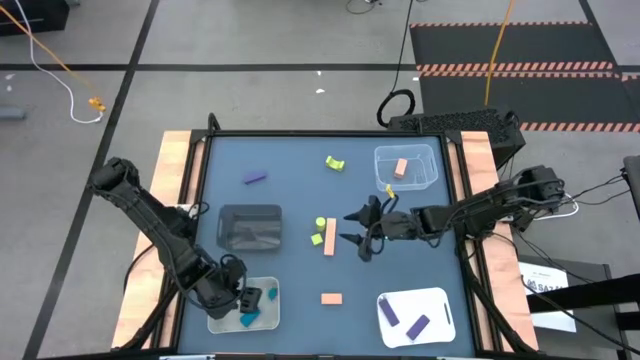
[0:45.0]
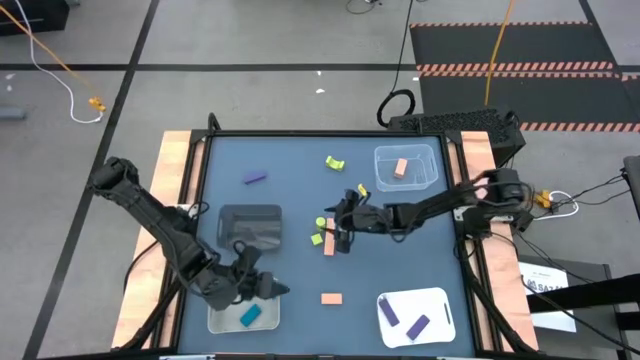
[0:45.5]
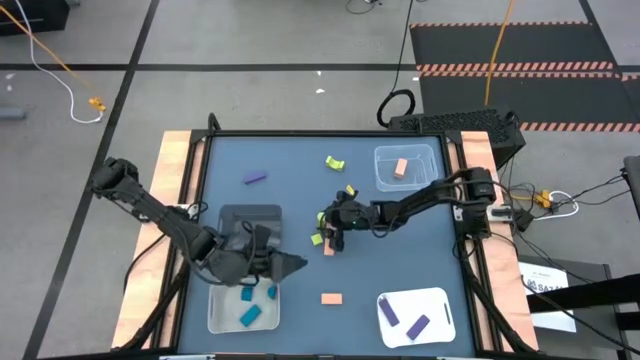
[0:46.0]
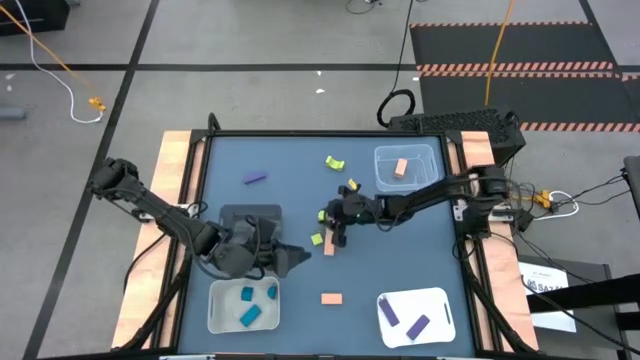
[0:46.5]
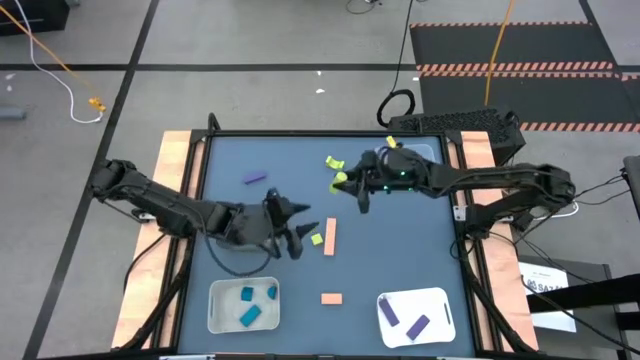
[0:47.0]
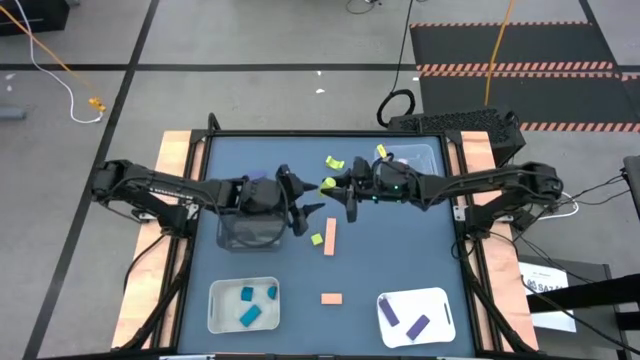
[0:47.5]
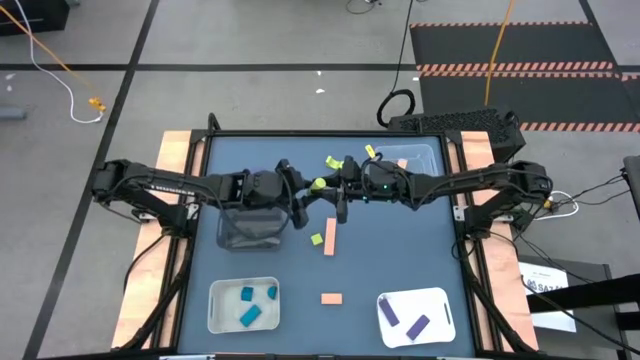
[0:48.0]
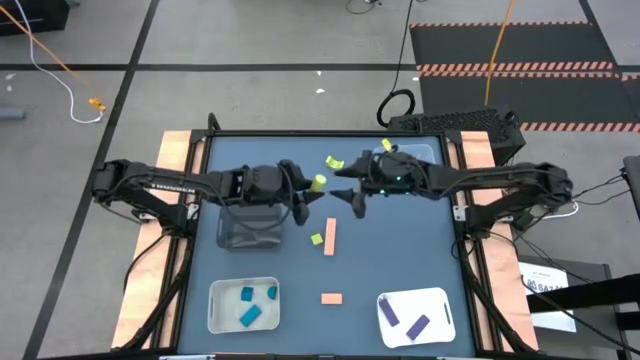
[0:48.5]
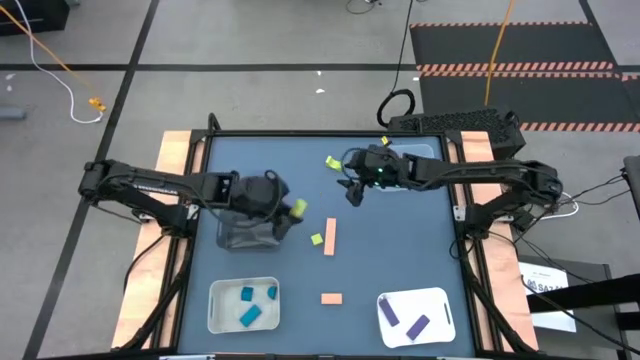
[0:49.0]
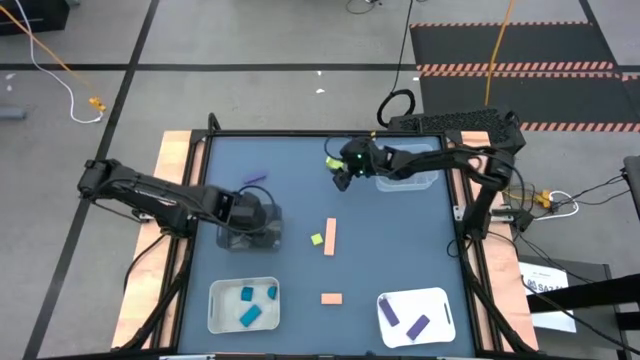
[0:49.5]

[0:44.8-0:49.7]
Task: Sort & place blocks by color
Put the center green block into the black bin

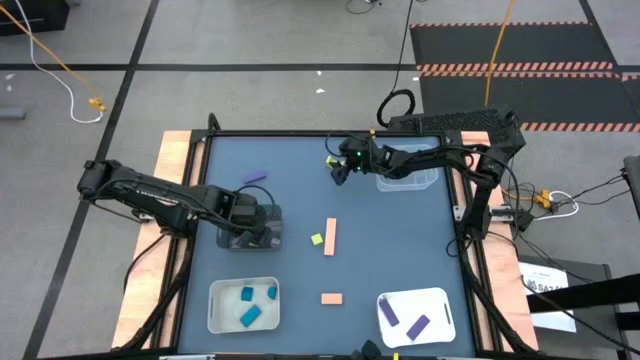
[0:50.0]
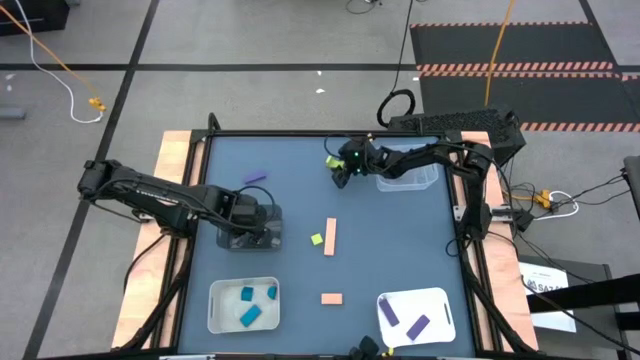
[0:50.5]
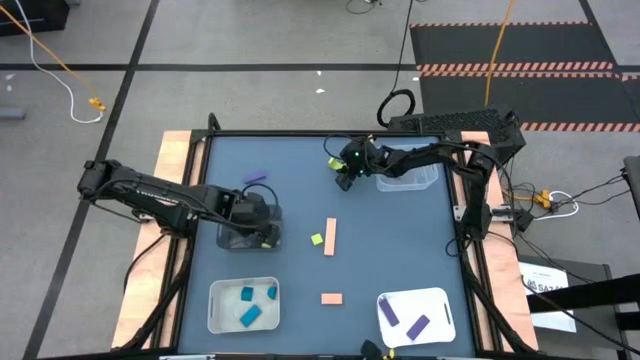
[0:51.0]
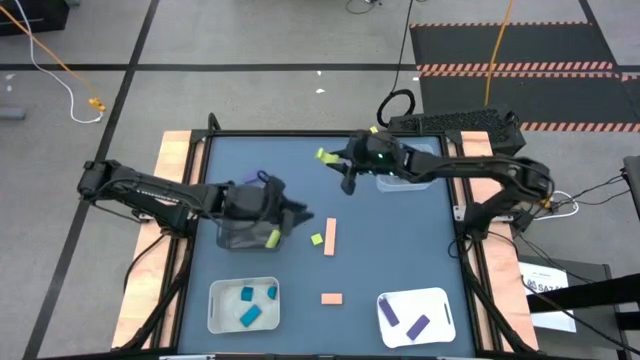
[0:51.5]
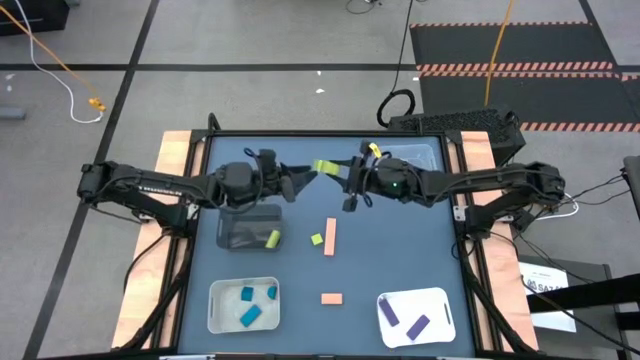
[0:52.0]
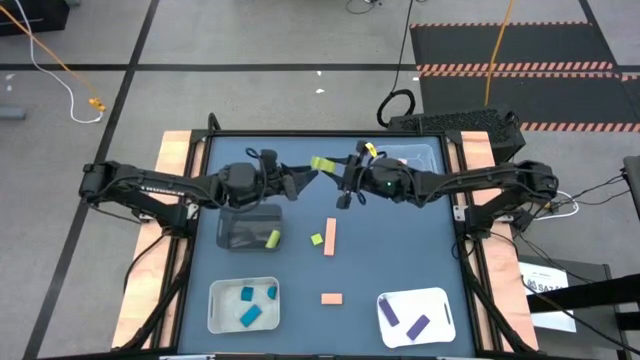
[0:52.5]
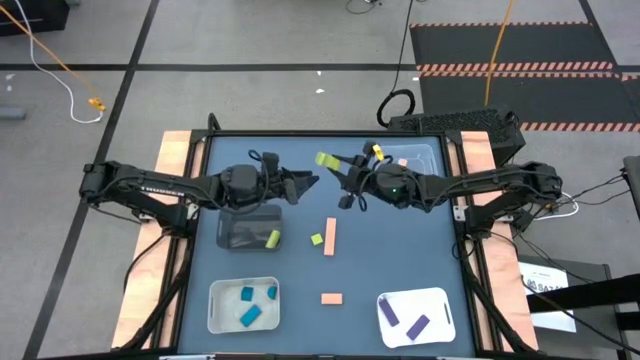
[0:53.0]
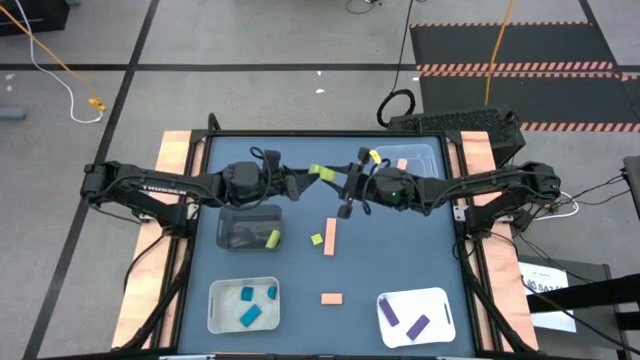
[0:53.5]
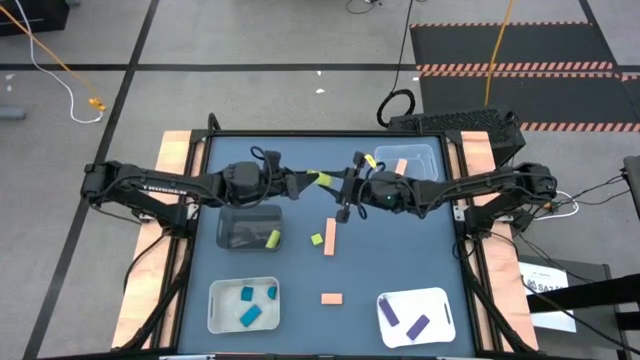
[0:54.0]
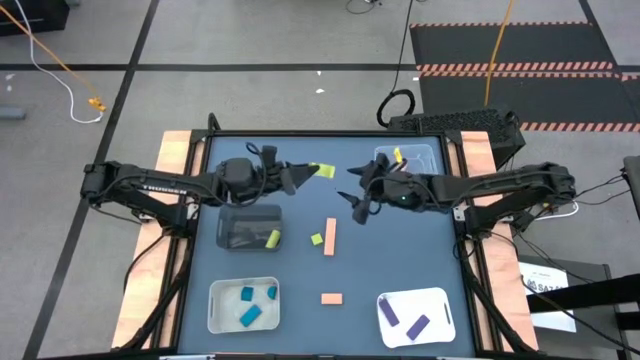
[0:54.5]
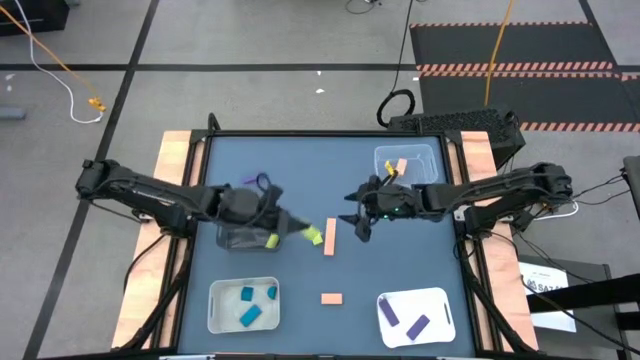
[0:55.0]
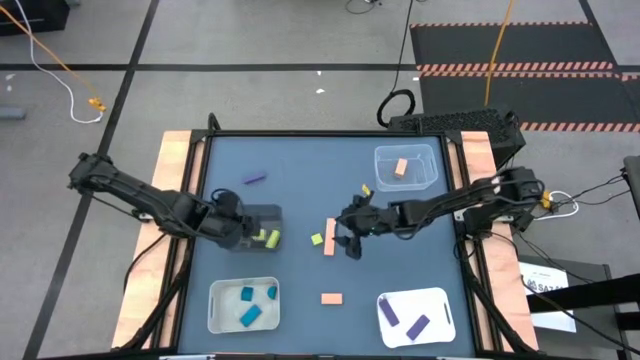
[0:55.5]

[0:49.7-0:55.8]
Put the top green block into the black bin

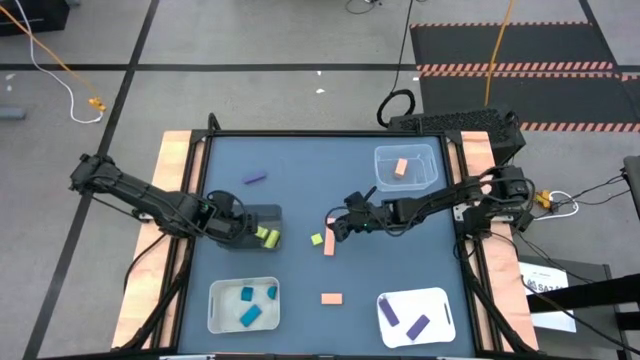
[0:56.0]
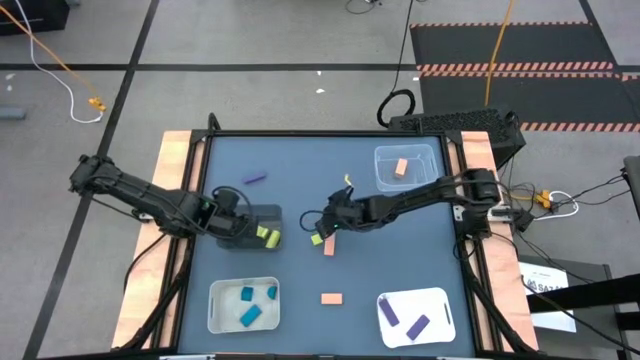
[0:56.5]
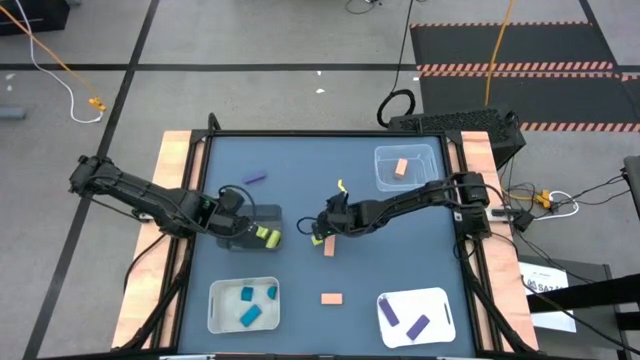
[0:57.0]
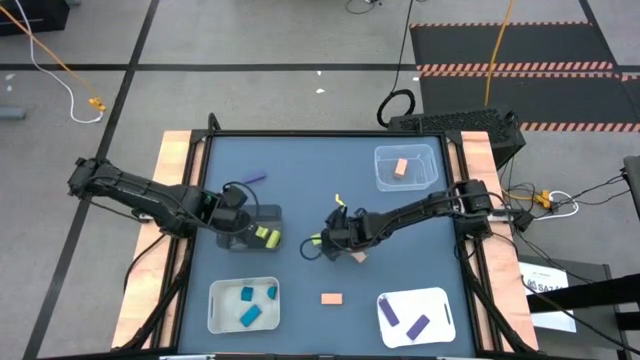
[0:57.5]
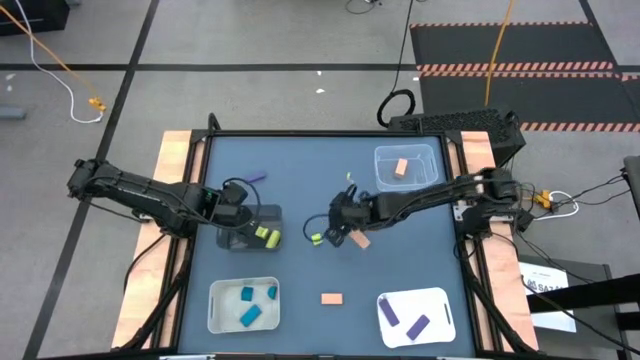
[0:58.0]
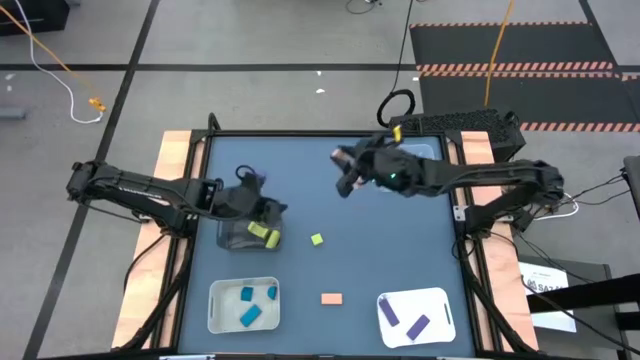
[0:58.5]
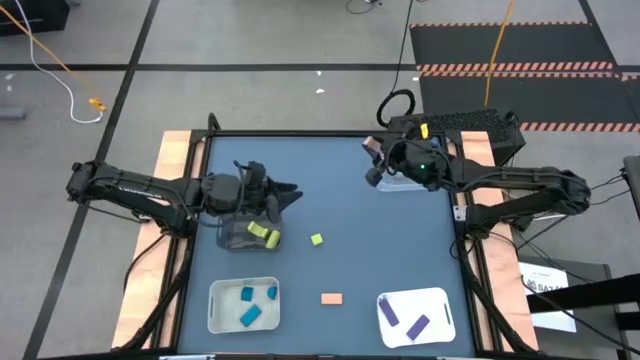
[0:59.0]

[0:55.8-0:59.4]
Put the top light brown block into the transparent bin

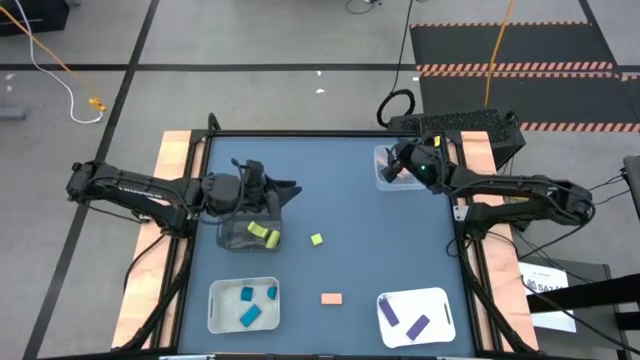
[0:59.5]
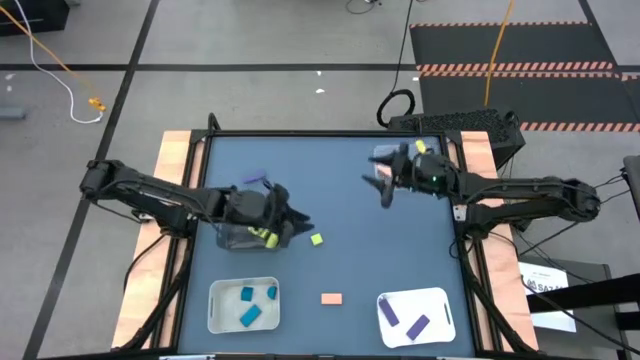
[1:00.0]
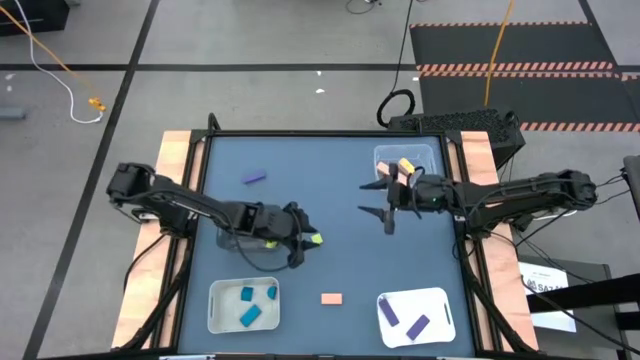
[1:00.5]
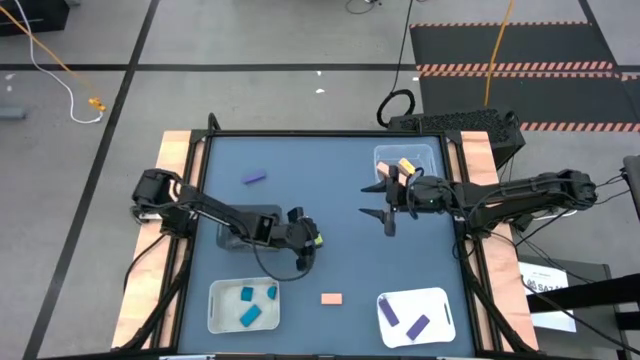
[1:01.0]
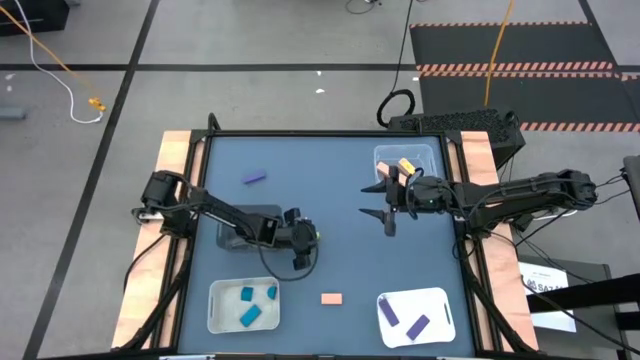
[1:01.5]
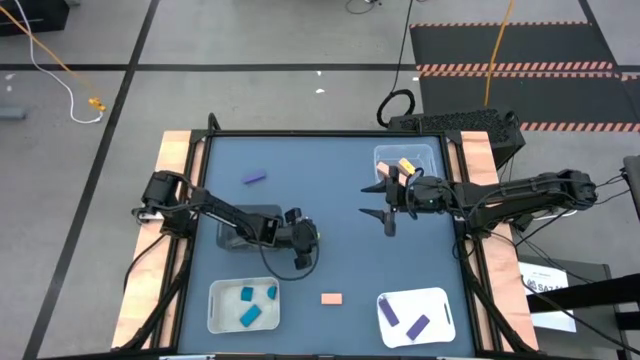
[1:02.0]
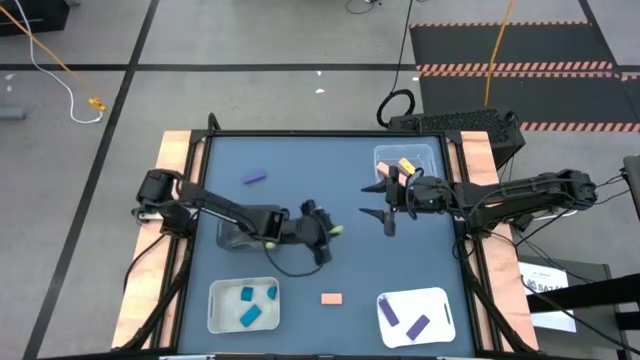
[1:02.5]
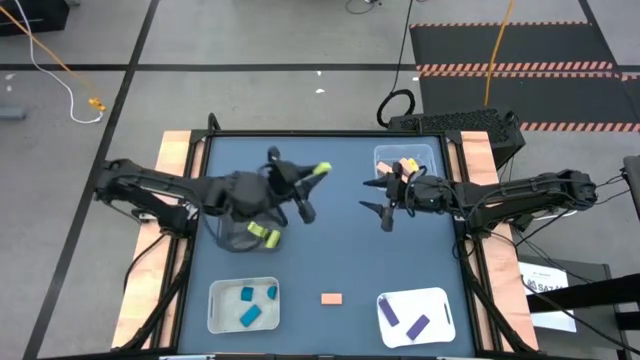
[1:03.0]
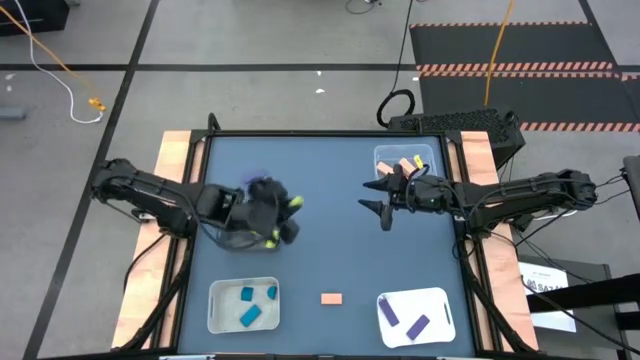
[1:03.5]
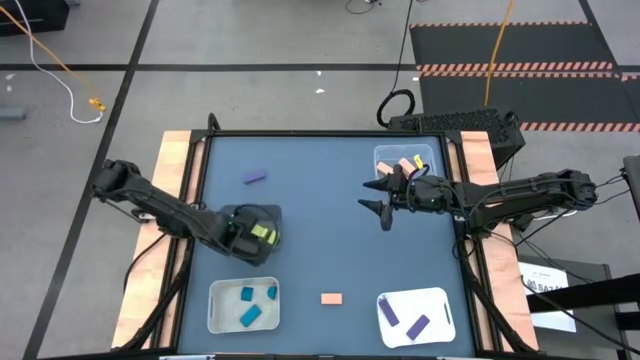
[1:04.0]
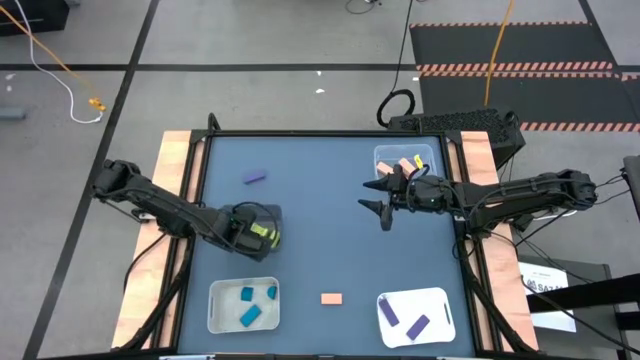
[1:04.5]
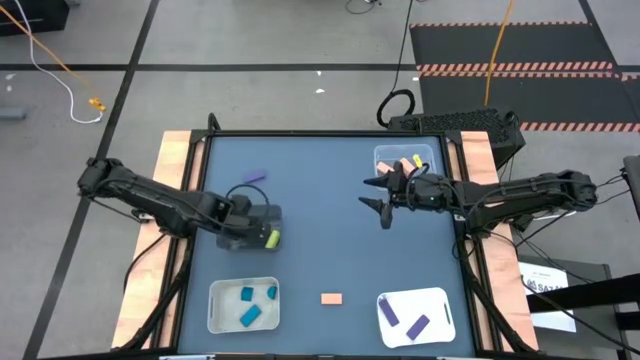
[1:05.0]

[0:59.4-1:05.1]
Put the green block into the black bin

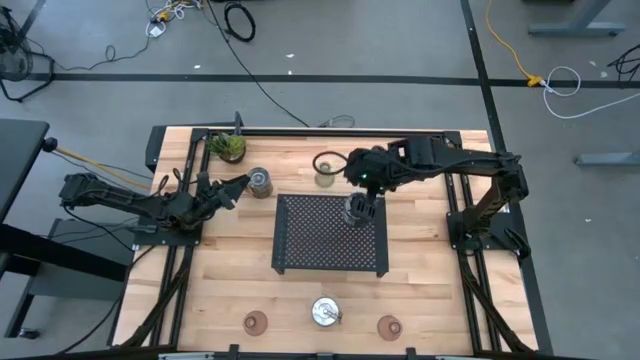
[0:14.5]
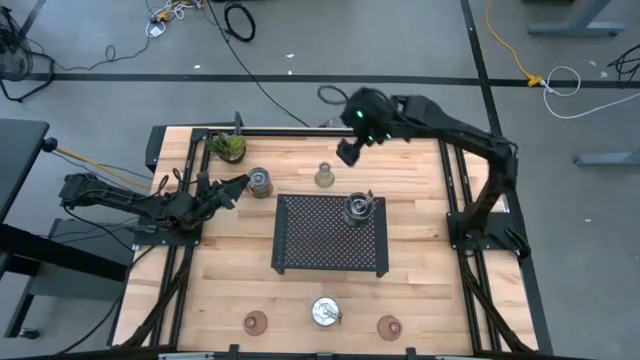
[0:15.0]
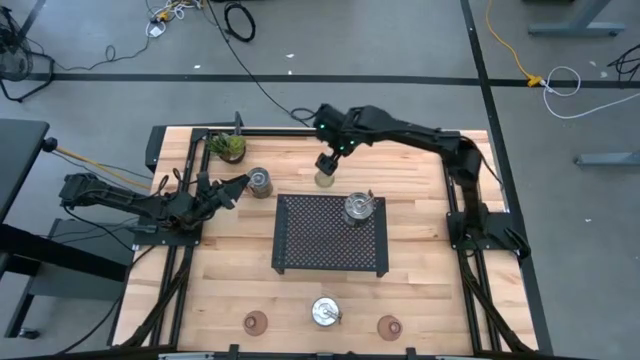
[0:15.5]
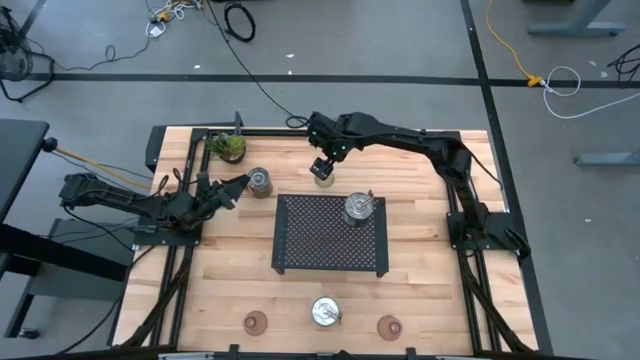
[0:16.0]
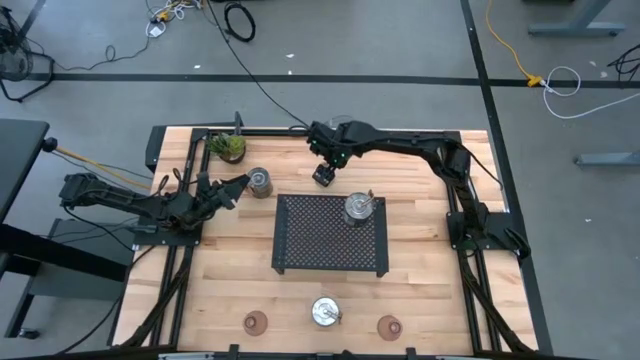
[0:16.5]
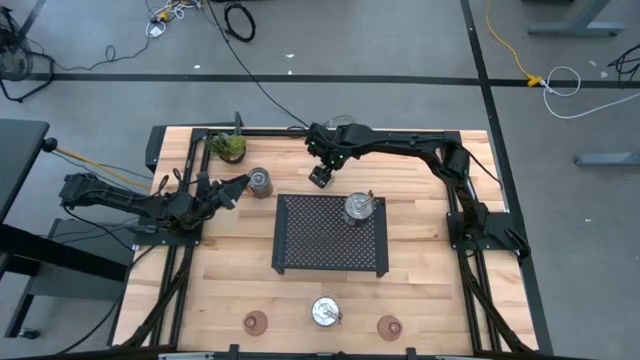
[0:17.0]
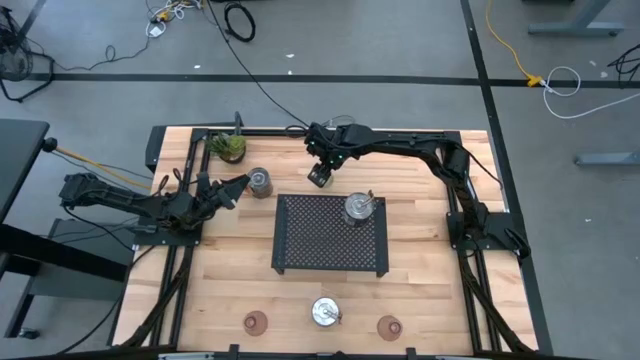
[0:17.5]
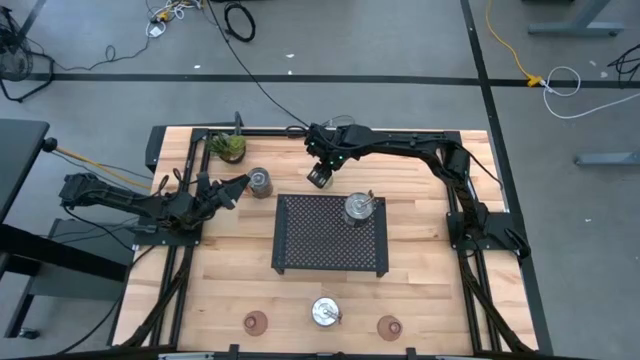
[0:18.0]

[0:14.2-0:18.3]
Task: Pick & Place candle stick holders
Put the green candle holder on the shelf
